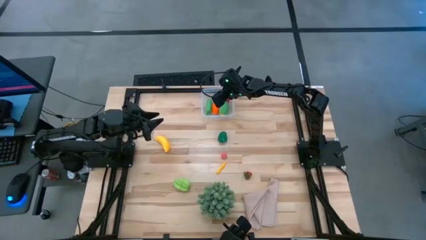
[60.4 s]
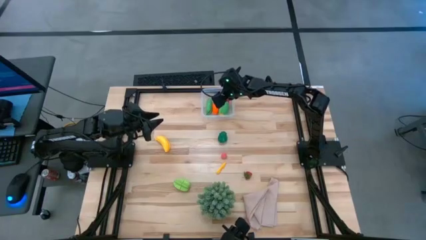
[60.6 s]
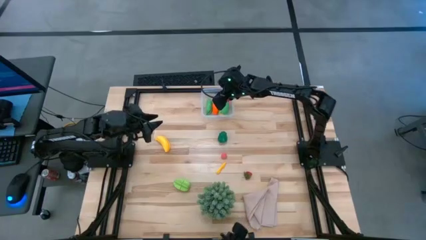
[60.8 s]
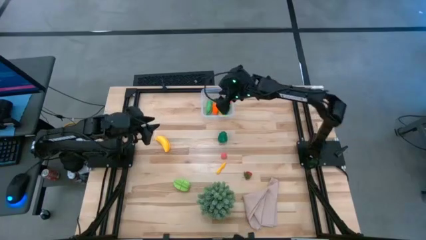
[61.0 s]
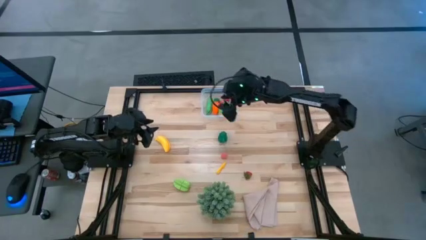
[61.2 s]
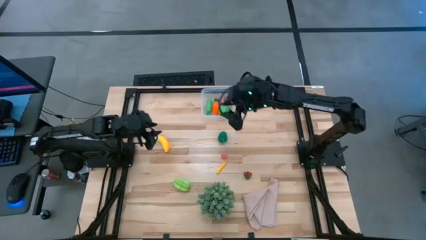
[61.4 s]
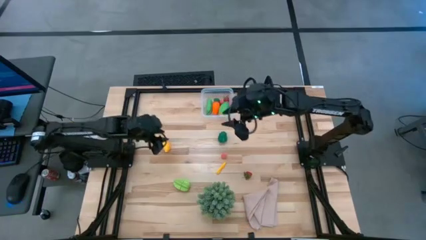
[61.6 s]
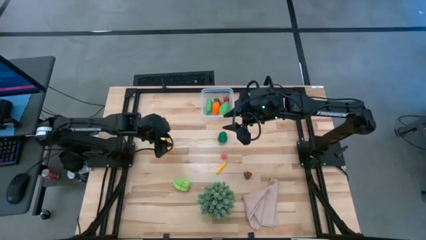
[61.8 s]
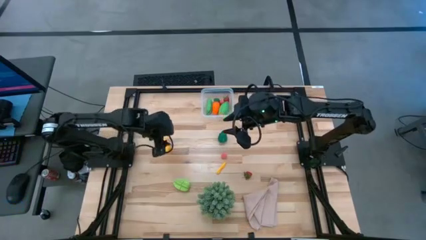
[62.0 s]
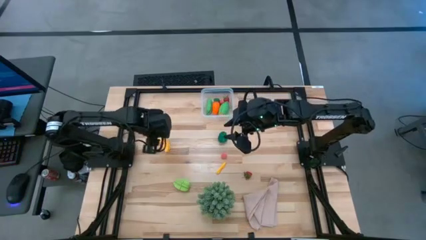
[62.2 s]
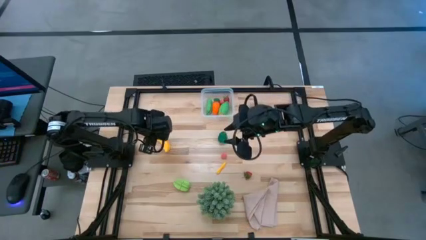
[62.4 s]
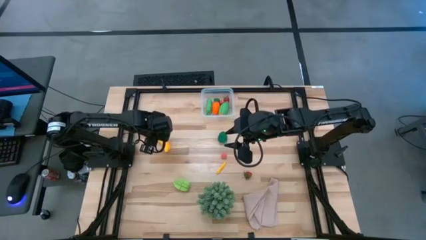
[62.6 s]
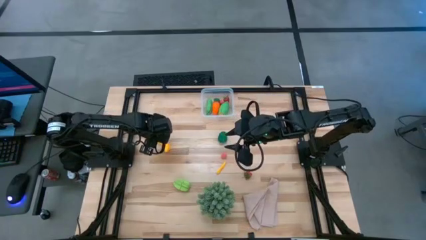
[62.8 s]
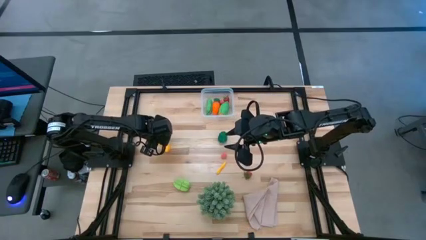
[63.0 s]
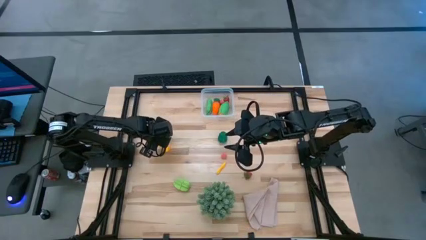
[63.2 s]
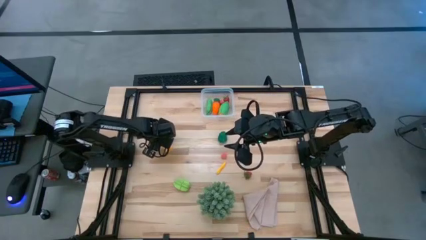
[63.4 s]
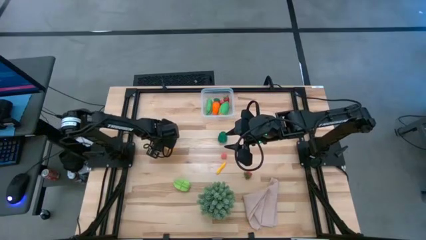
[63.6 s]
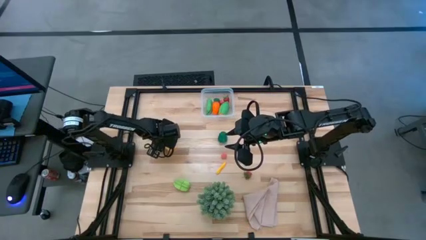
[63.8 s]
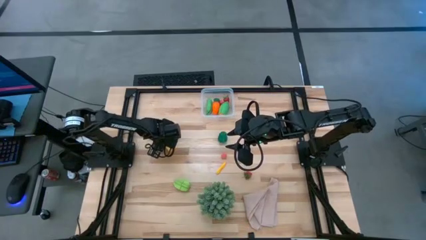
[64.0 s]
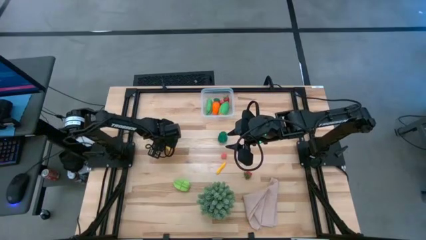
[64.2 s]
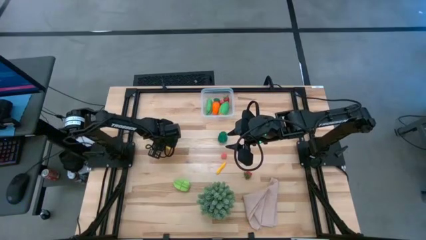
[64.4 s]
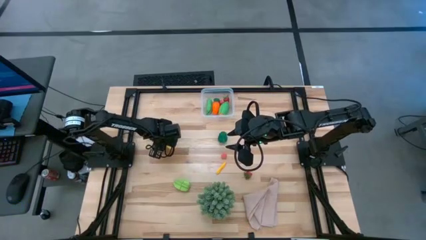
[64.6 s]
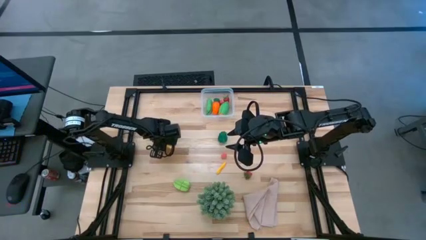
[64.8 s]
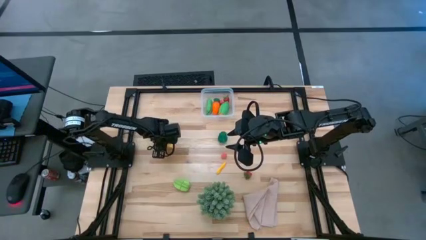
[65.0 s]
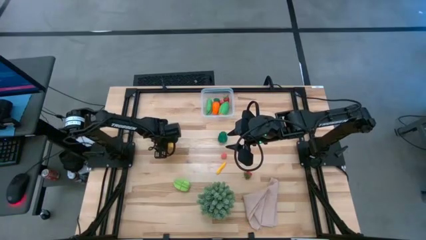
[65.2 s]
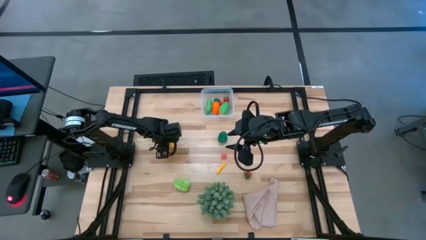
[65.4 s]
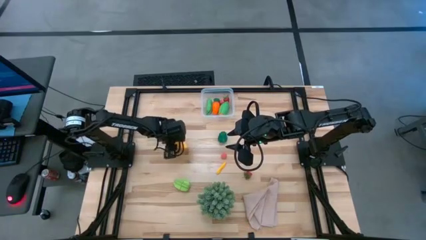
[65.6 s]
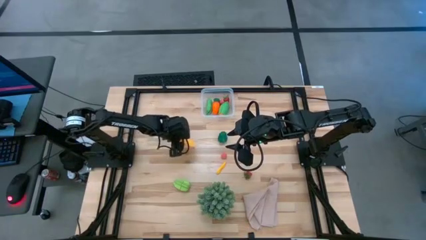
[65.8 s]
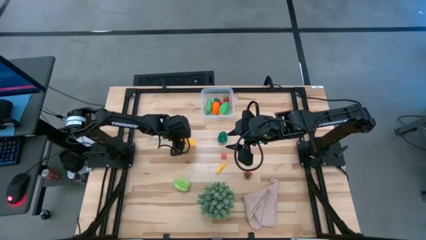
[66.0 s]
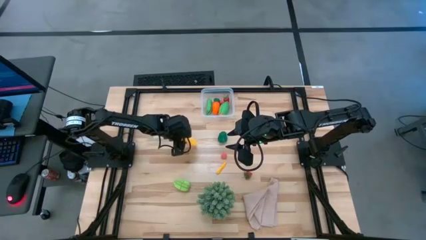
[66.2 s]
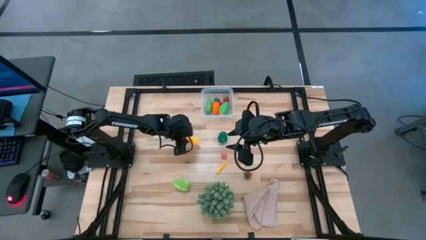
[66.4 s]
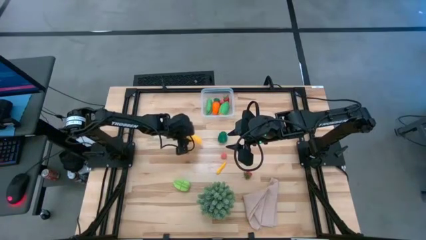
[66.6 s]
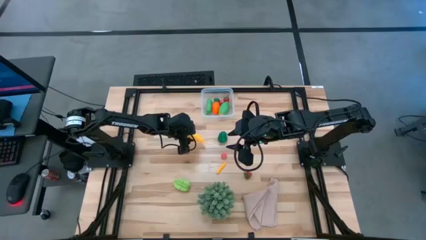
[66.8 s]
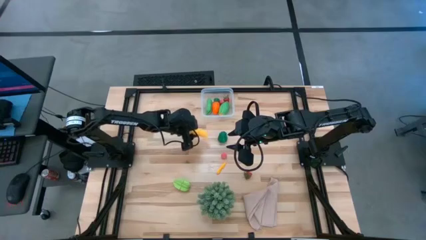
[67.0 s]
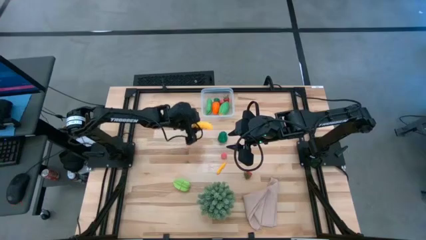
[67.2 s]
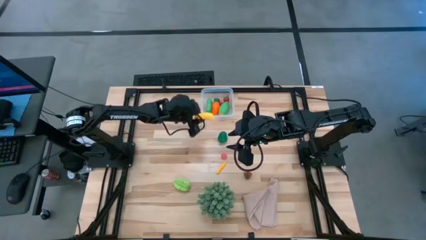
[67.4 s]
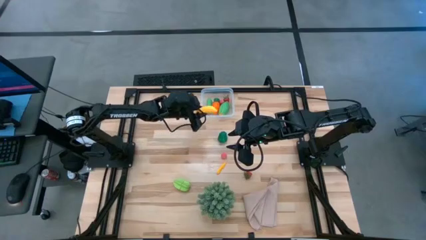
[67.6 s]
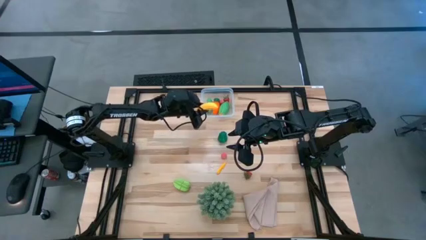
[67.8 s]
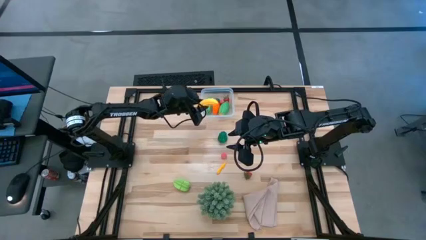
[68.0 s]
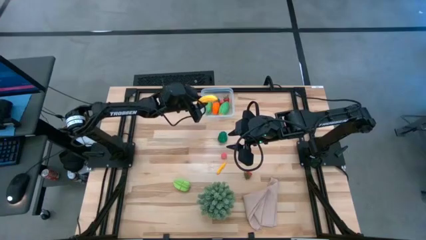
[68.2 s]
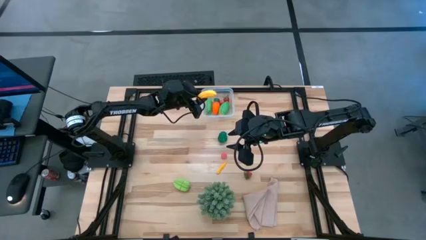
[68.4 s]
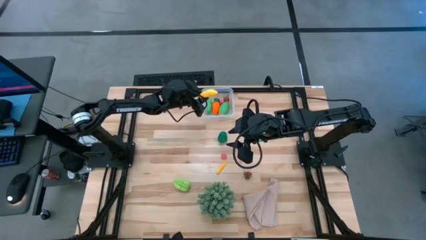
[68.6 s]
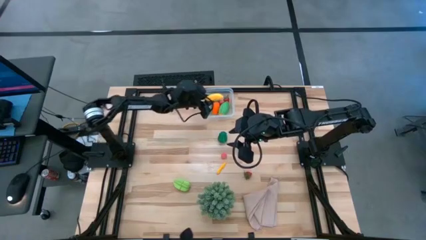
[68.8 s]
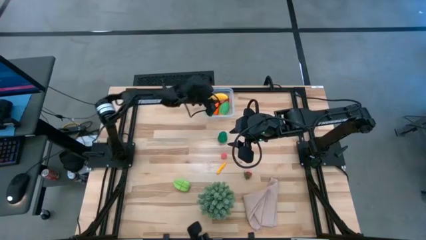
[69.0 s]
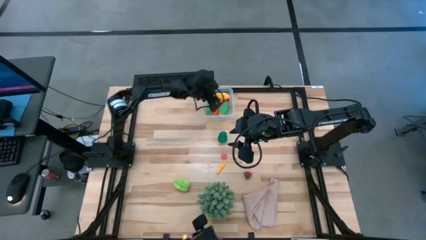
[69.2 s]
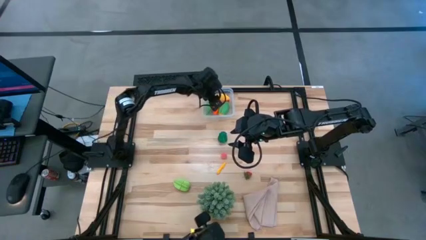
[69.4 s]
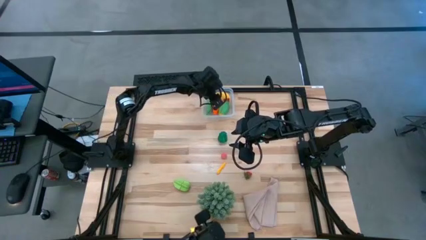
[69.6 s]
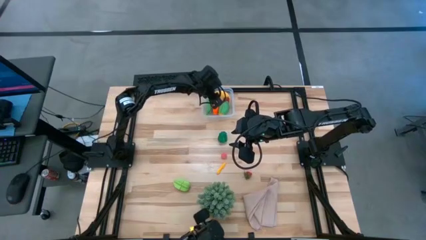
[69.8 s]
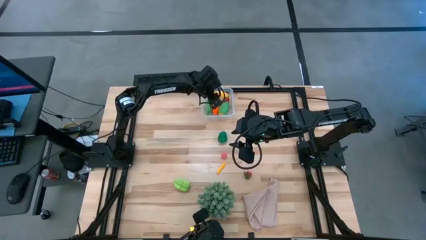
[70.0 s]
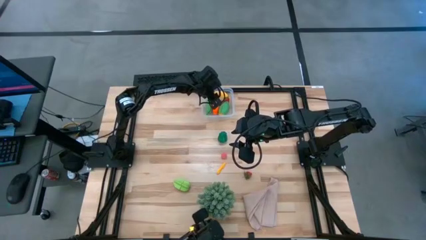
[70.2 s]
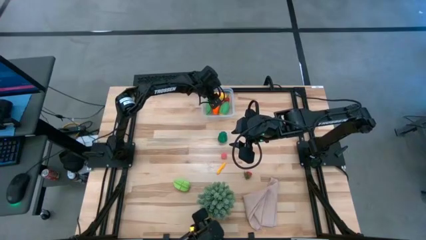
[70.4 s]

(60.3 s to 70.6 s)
Task: Pick and placing Produce into tupperware
Put the banana into the transparent bin

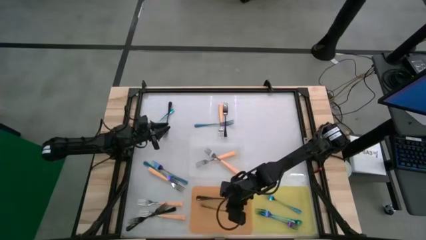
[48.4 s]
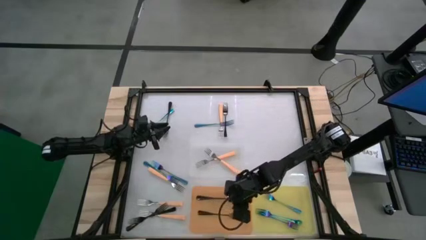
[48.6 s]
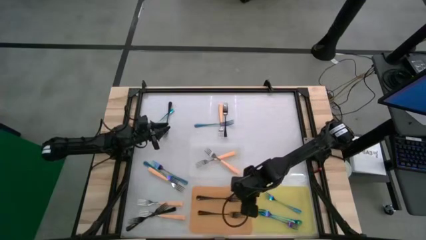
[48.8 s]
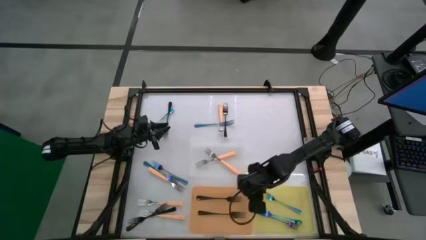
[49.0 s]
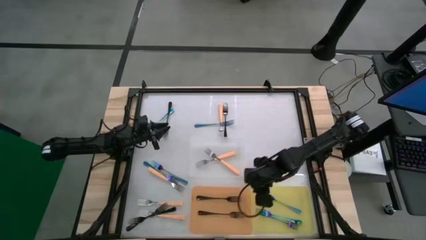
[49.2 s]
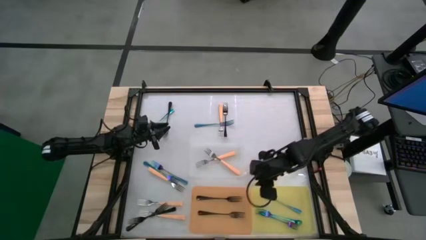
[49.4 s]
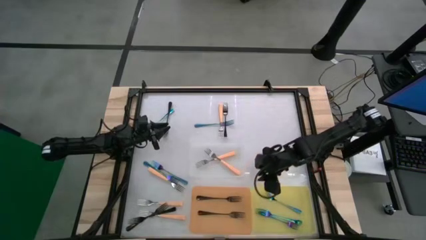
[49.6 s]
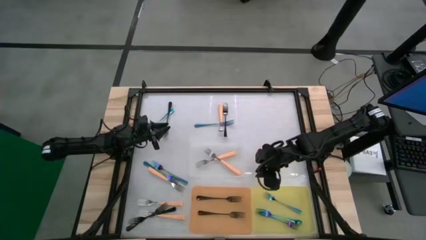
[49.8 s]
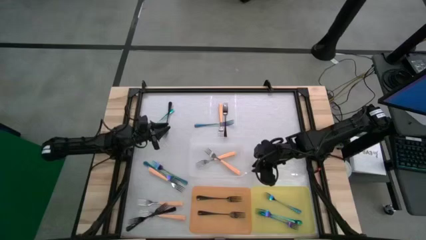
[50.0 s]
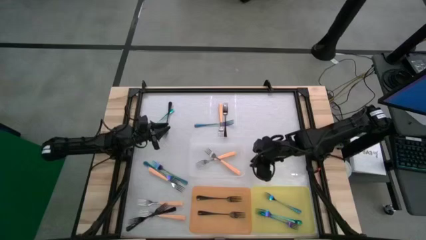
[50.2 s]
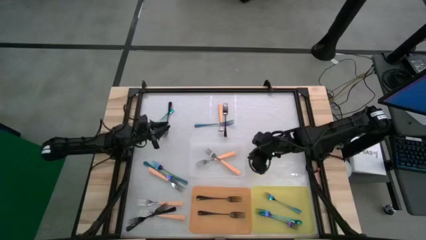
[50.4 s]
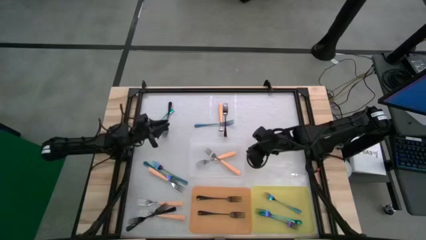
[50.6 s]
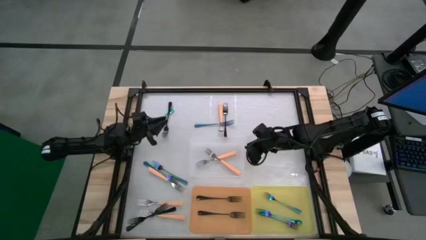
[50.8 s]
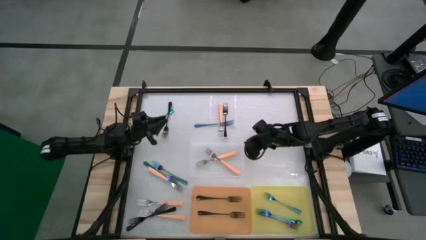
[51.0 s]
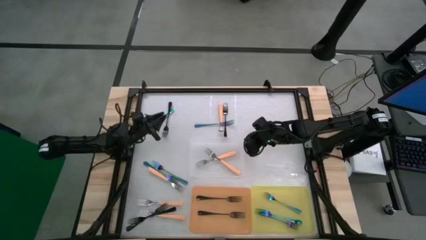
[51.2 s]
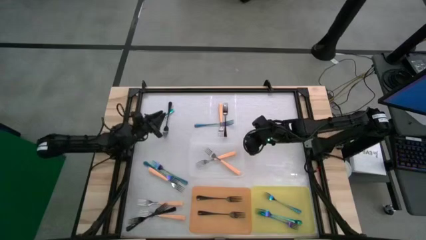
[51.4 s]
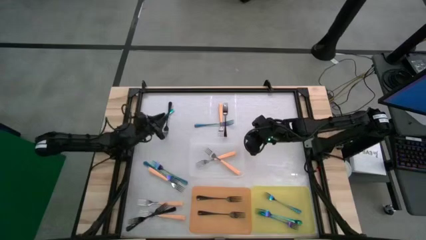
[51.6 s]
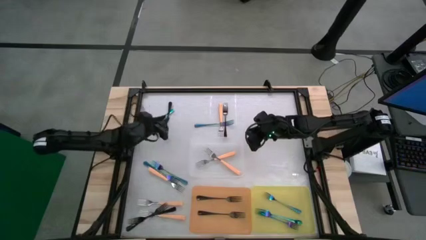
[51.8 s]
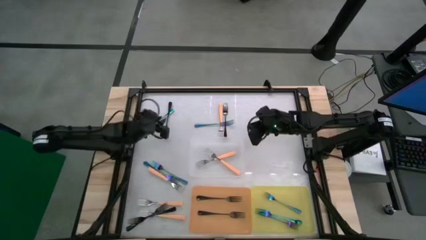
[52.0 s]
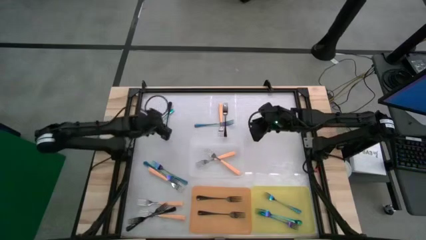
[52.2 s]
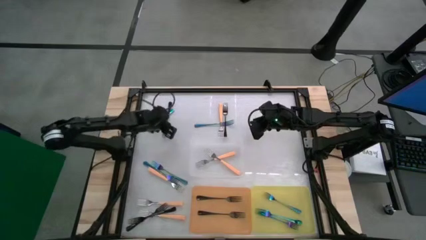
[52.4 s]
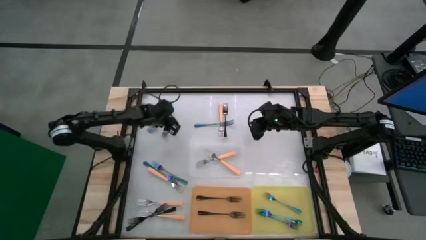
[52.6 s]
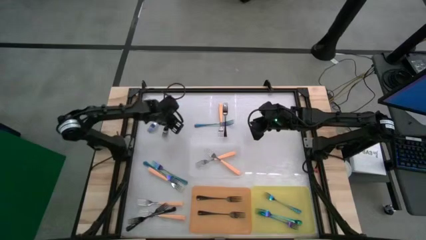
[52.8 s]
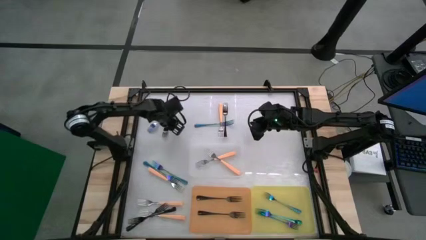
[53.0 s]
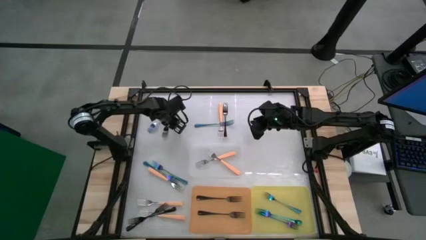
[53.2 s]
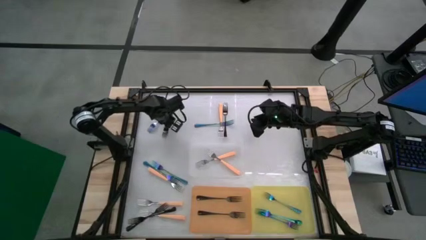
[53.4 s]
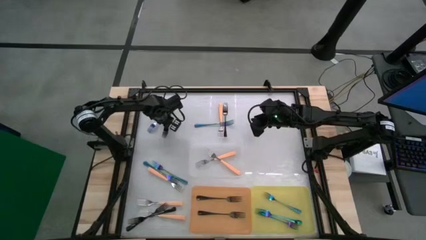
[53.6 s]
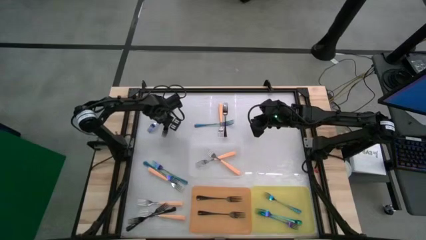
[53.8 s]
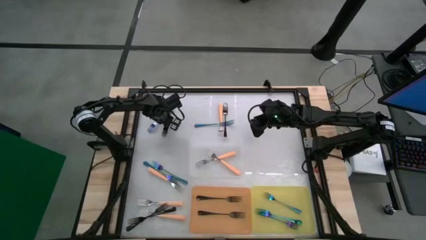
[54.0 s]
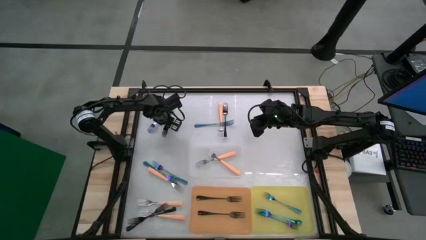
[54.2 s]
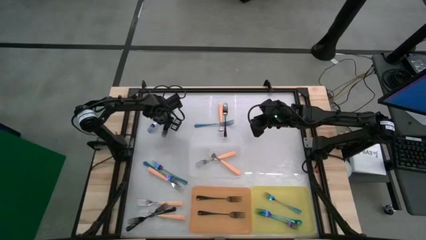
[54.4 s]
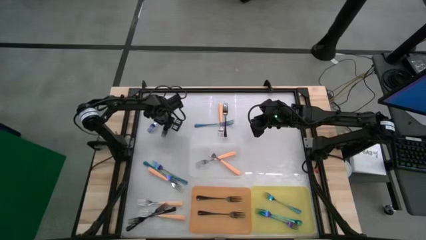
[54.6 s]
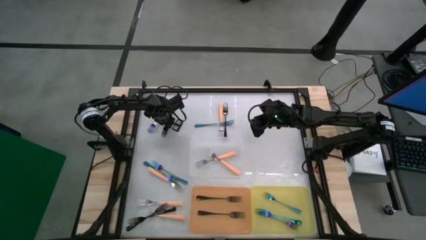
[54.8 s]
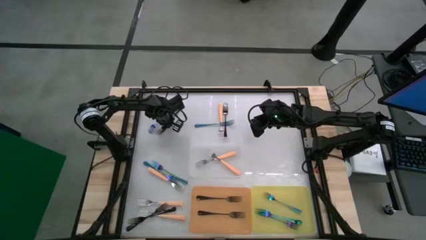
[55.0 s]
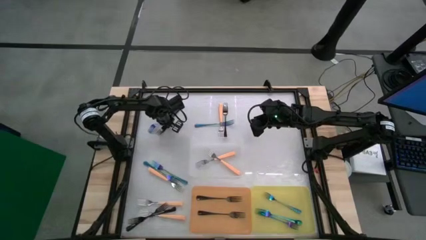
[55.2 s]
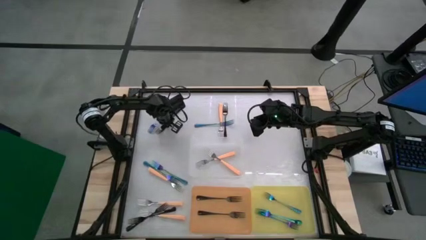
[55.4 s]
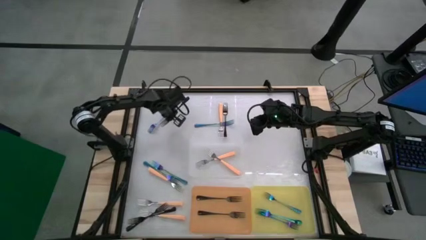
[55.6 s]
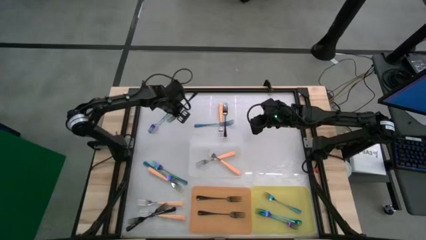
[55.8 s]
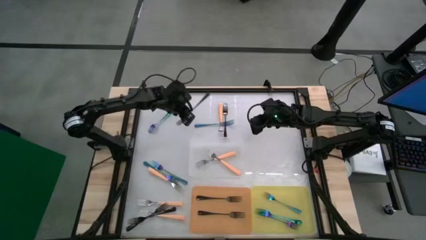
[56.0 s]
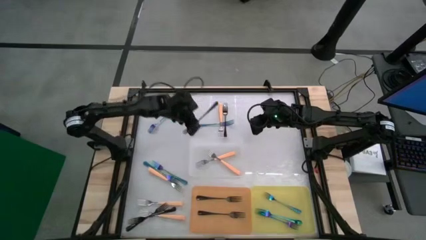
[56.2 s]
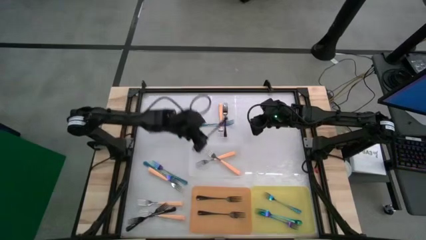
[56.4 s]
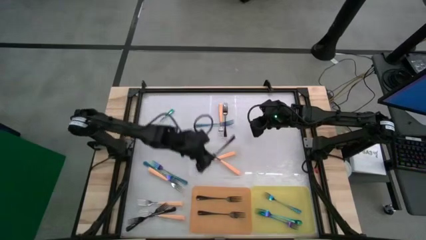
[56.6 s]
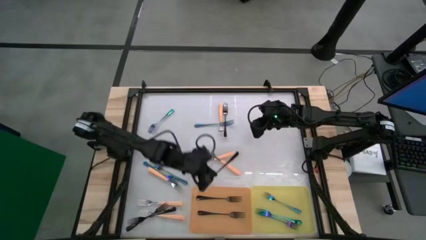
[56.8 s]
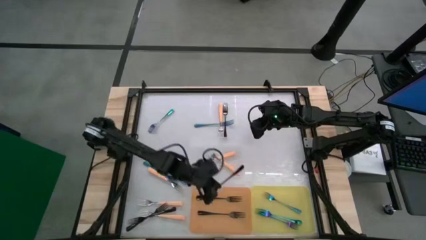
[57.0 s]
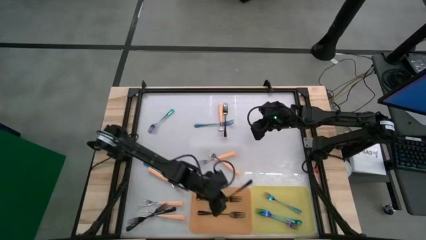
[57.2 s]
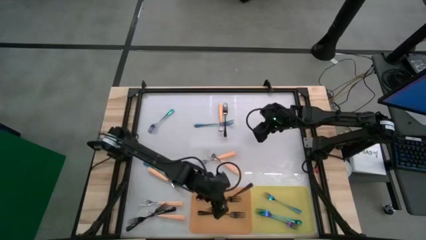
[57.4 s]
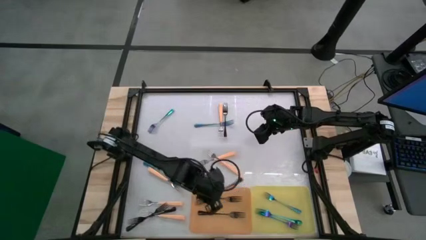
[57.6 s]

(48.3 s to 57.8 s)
Task: Sort silverware by color (type)
Put the black fork into the orange bin
